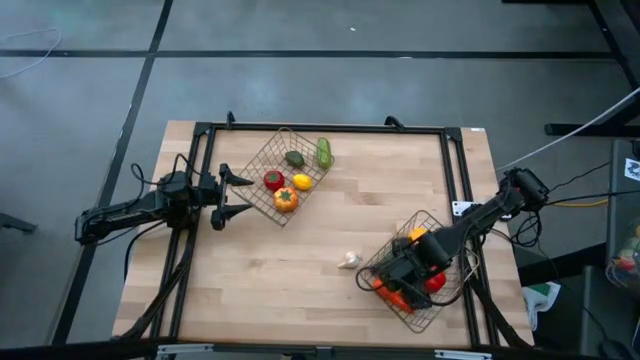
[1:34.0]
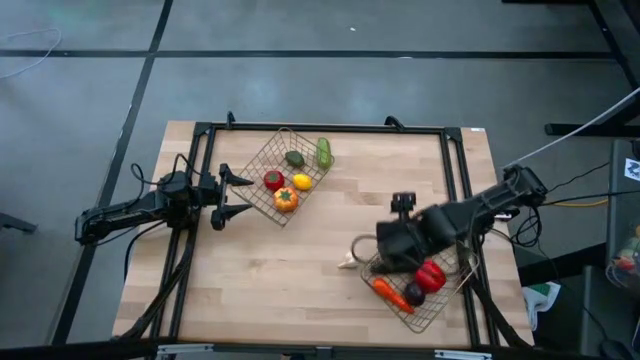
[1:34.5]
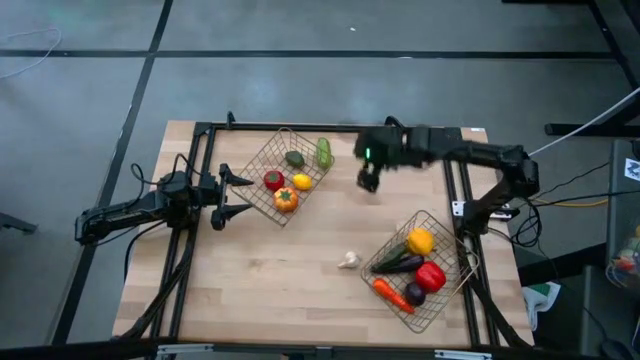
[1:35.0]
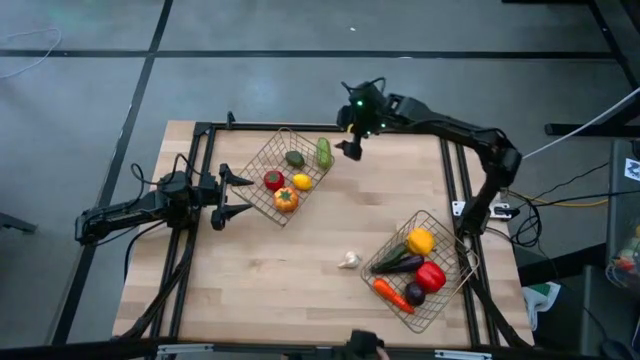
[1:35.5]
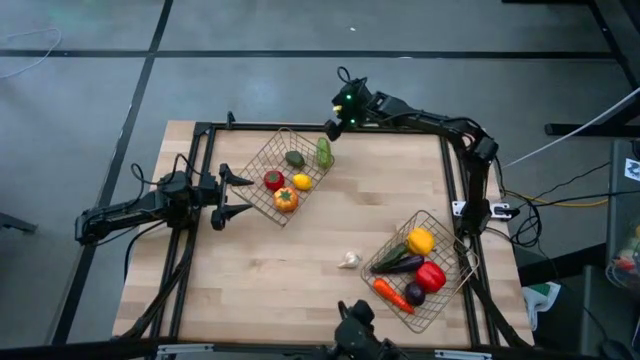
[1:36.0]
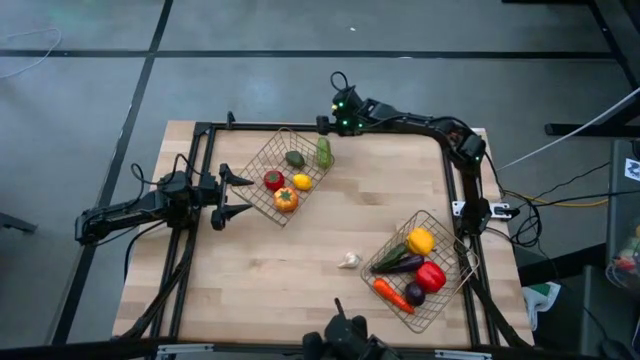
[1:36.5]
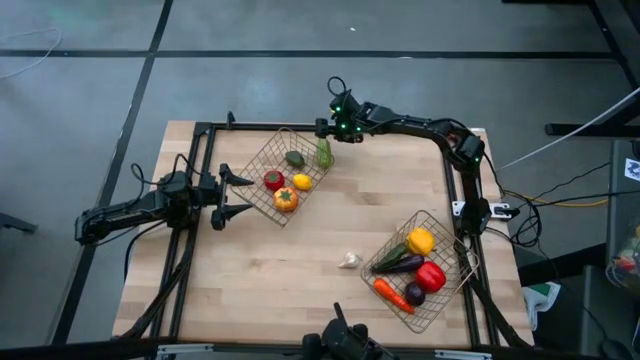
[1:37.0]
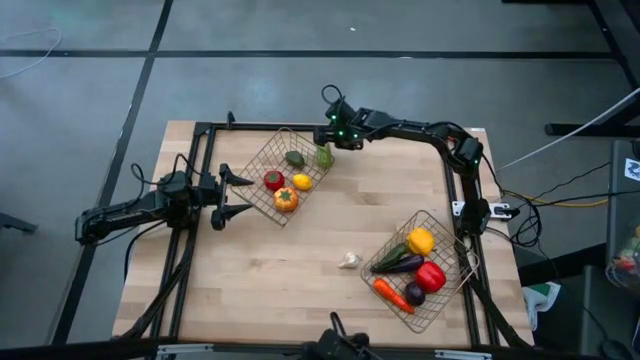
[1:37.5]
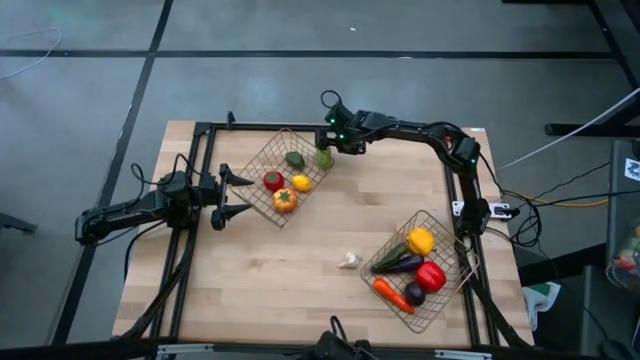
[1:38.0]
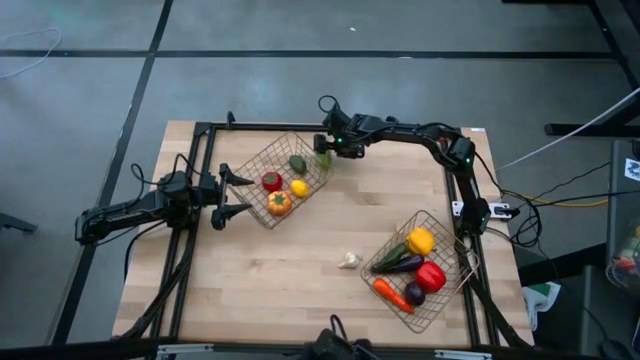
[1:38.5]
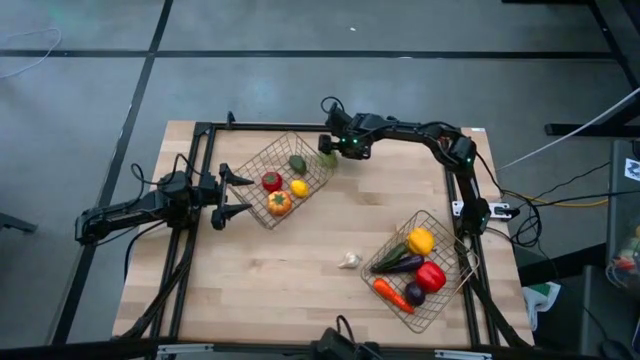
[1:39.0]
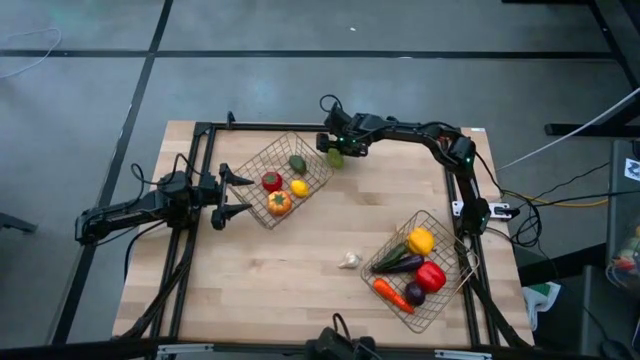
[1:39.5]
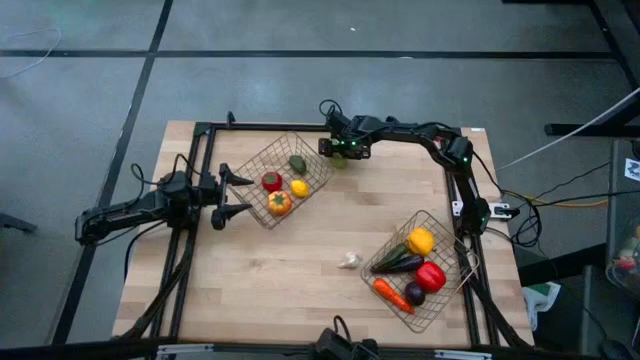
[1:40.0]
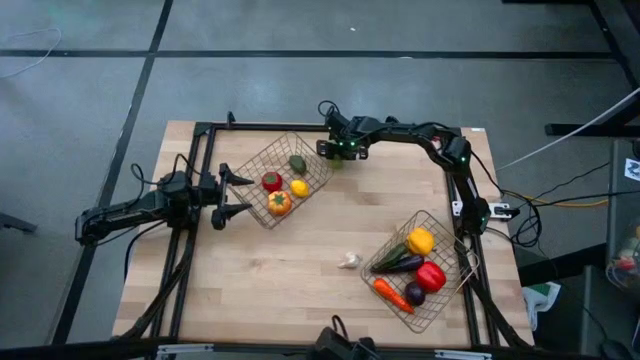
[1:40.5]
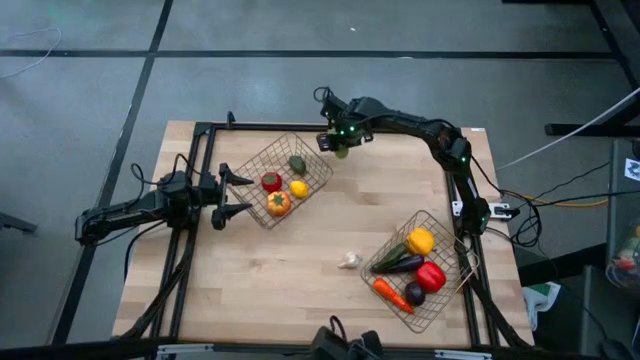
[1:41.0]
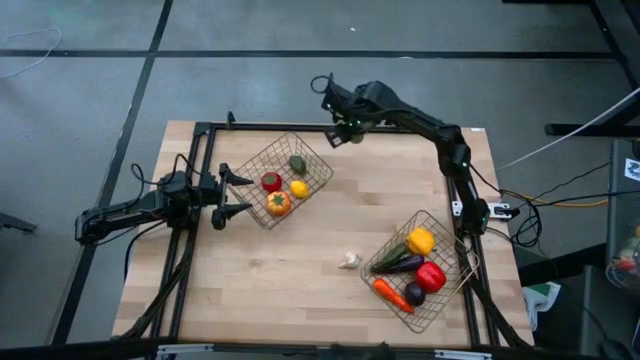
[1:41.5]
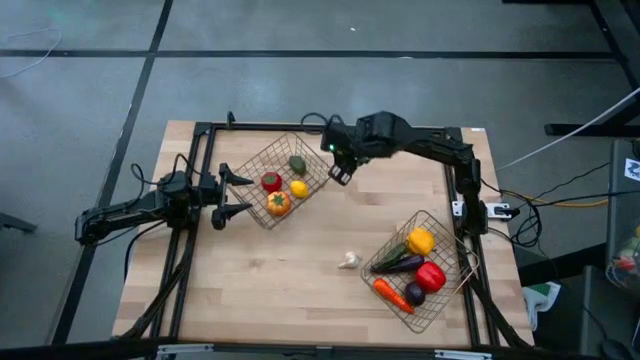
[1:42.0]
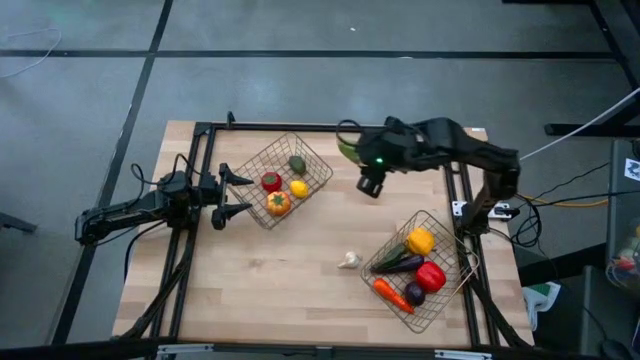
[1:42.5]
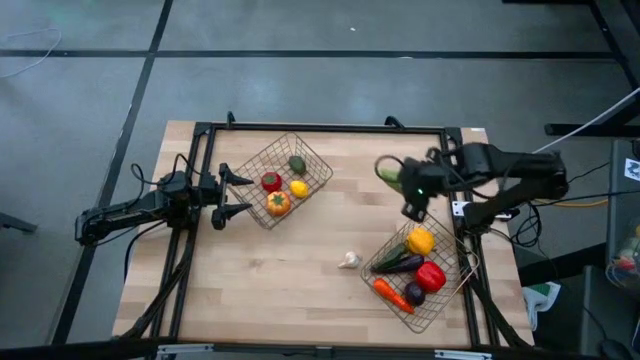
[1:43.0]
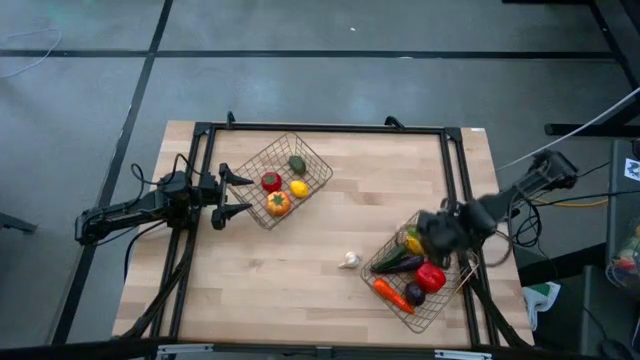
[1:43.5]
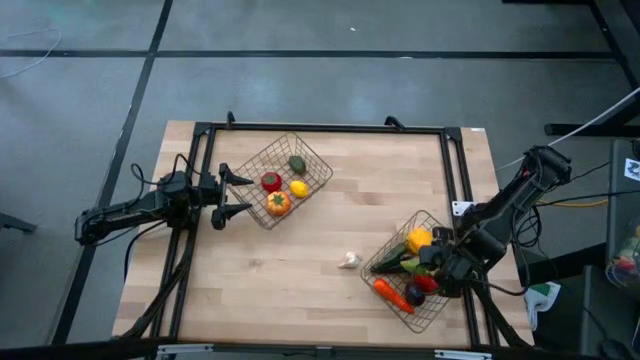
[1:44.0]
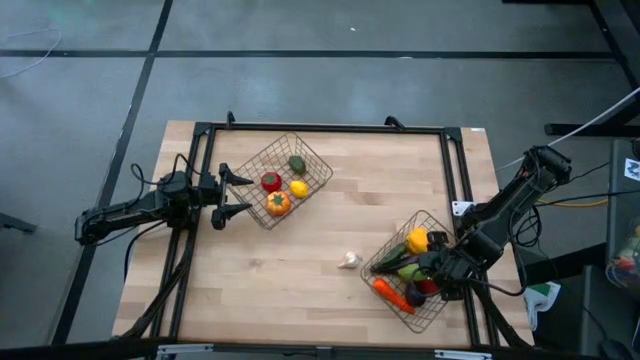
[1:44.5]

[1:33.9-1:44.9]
Task: Sort produce into baskets
Put the chayote into the bottom basket

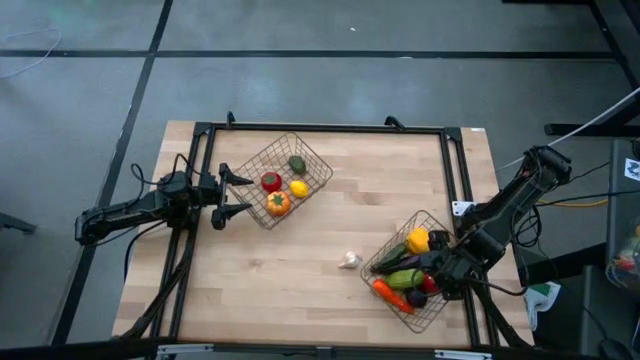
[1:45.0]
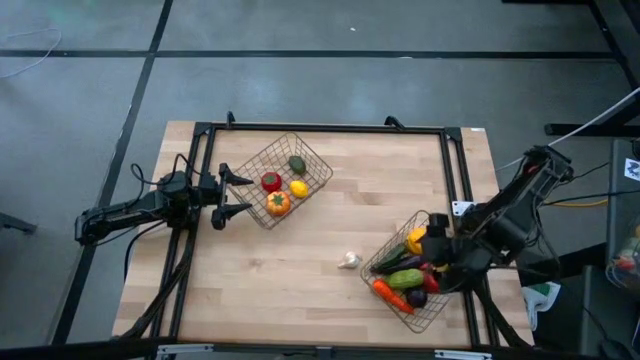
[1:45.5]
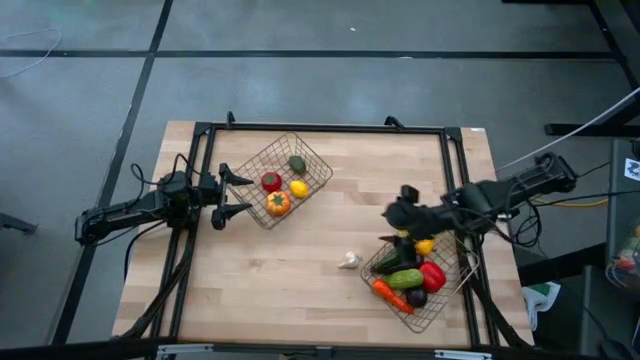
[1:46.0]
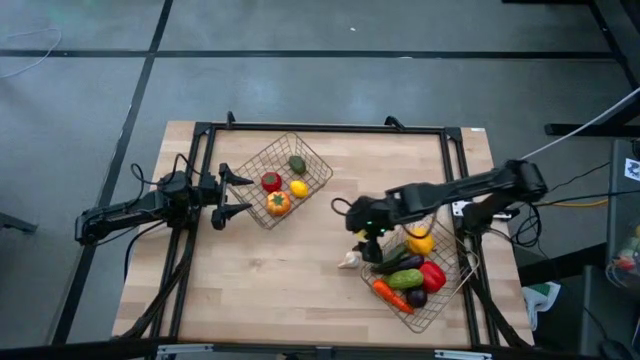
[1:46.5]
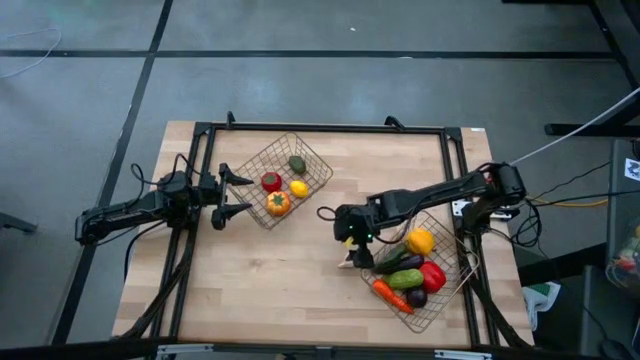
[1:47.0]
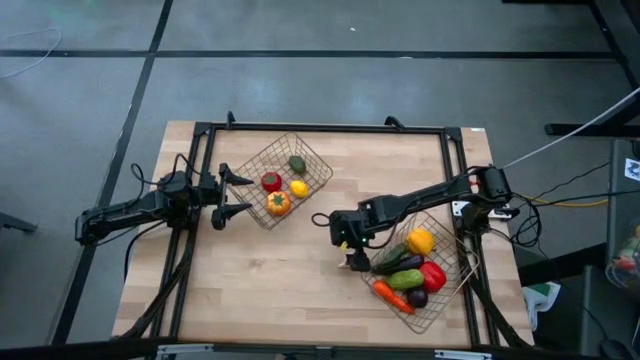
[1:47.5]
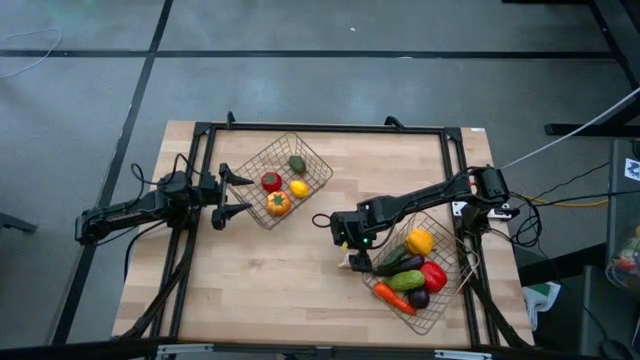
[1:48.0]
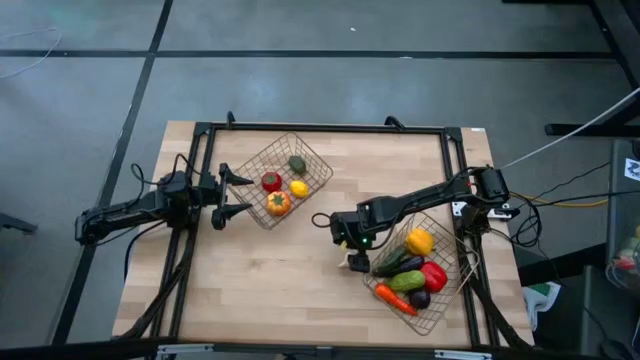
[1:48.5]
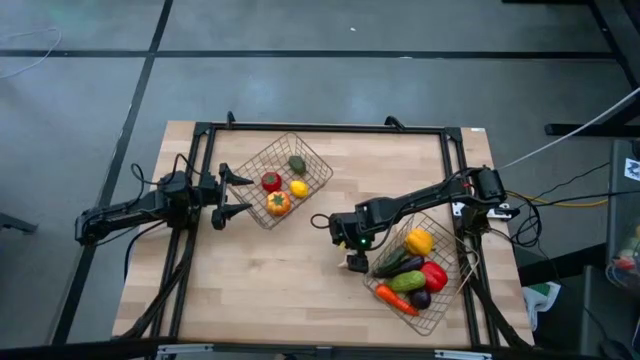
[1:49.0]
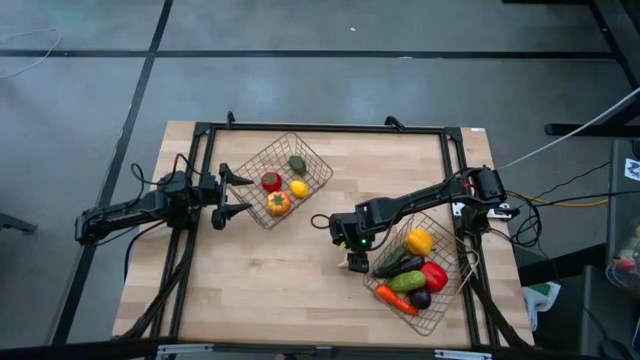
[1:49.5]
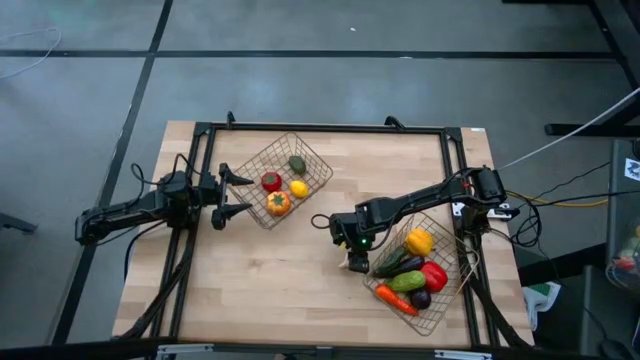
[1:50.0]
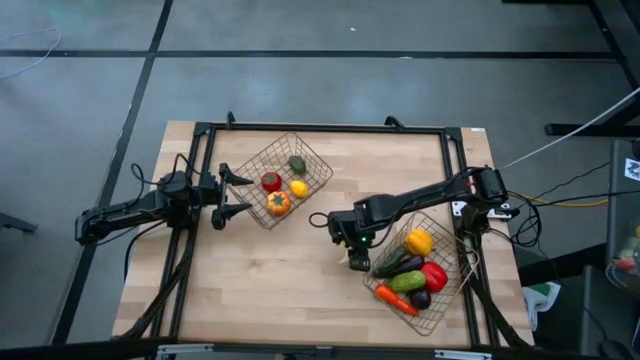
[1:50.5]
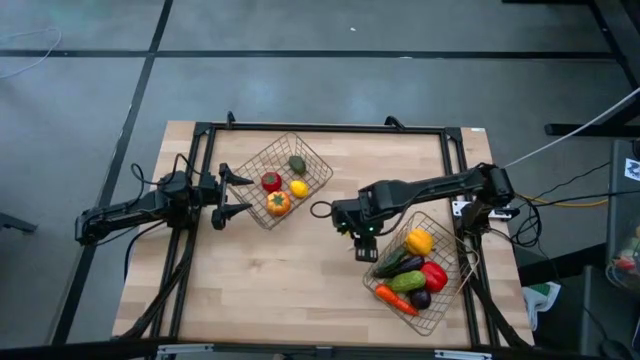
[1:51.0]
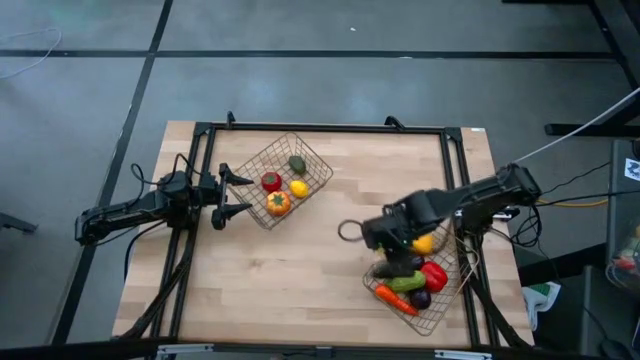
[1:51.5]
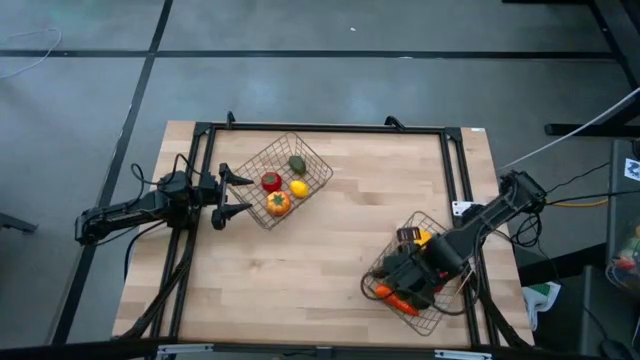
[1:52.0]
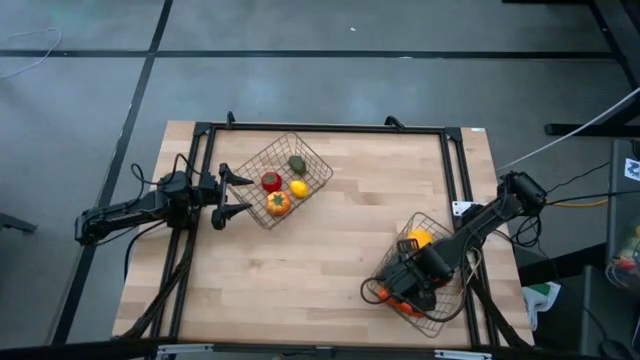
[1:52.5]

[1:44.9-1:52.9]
Put the garlic into the bottom basket

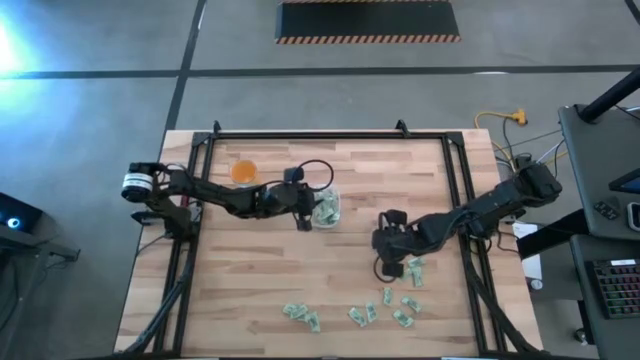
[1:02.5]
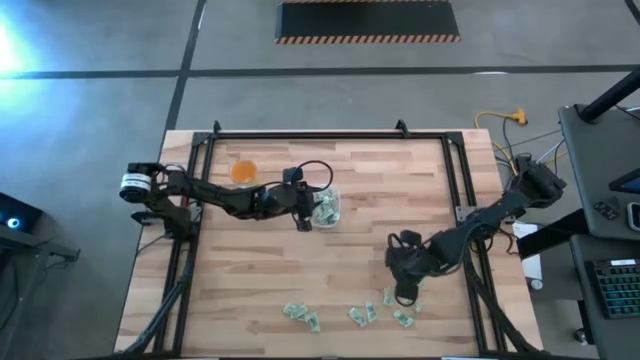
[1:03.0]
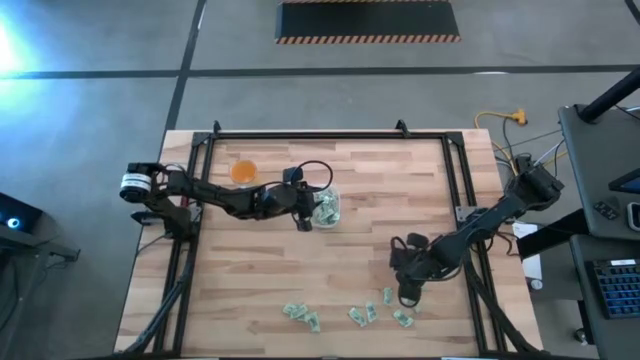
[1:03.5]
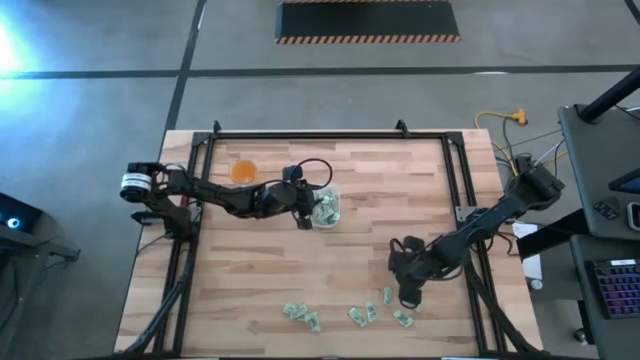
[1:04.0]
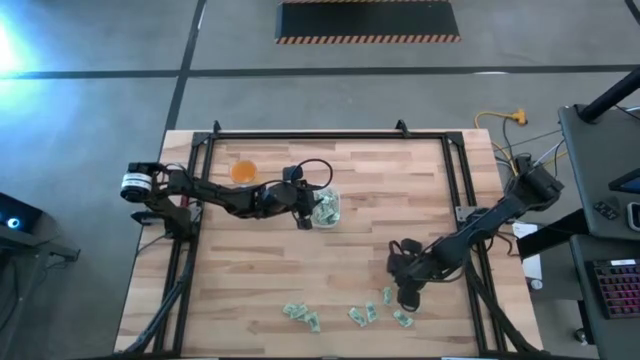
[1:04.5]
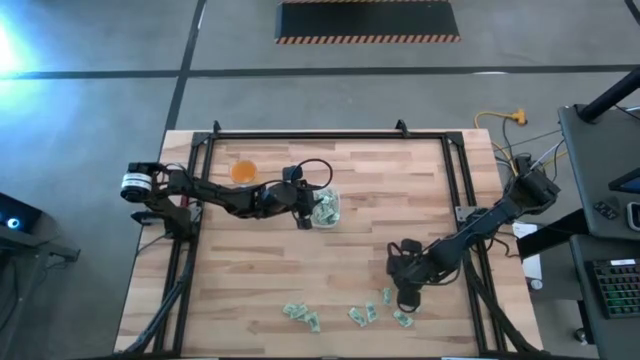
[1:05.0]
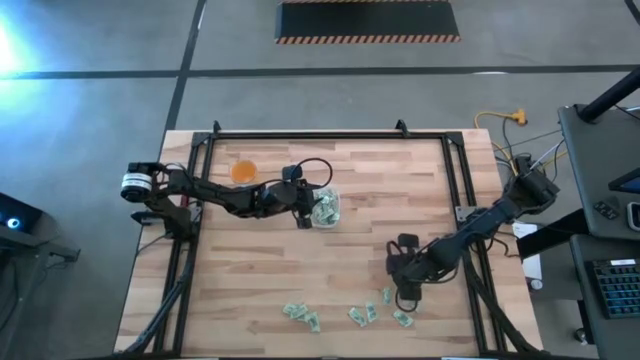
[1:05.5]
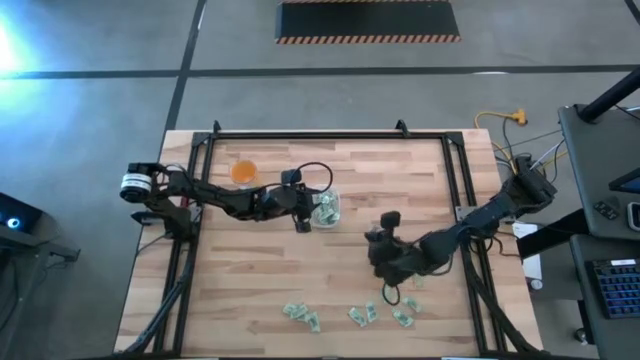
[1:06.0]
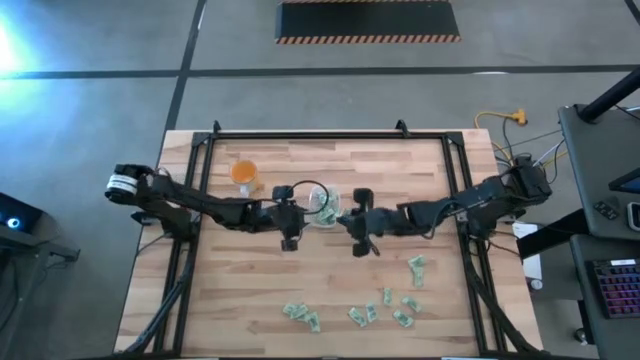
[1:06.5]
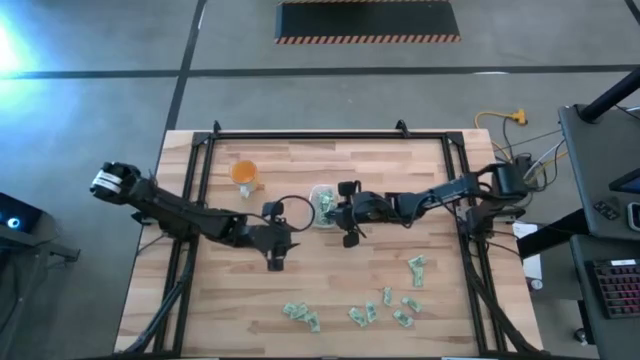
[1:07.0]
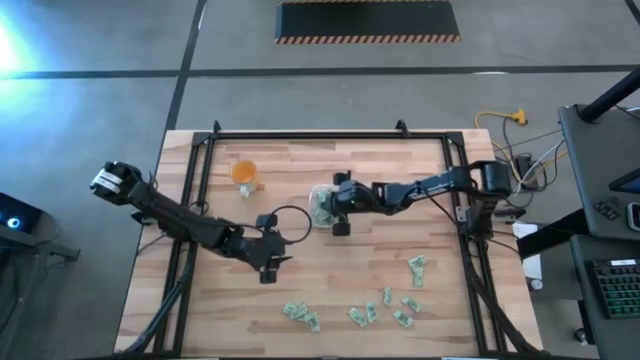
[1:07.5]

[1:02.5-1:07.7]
Task: Pick and place Stevia / Truvia into bins
Put the stevia packet into the bin
